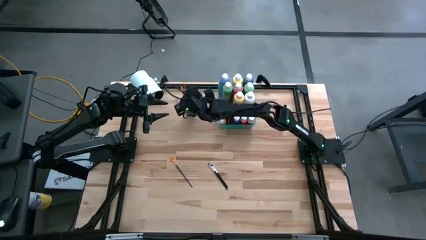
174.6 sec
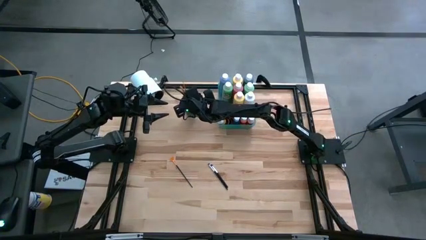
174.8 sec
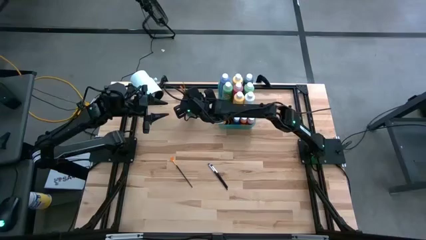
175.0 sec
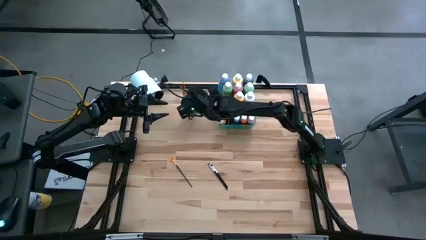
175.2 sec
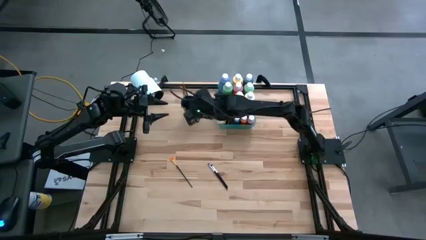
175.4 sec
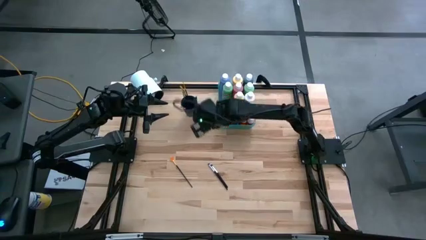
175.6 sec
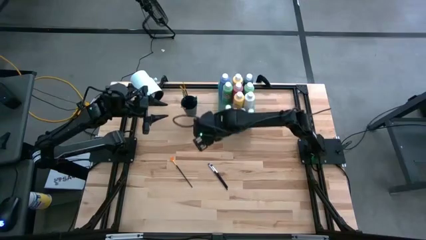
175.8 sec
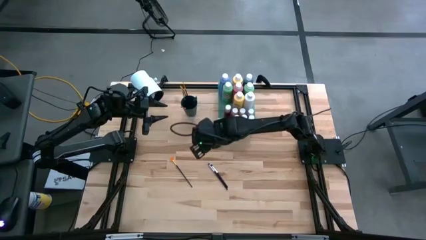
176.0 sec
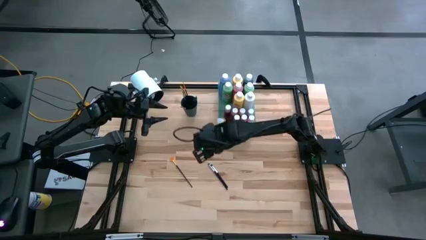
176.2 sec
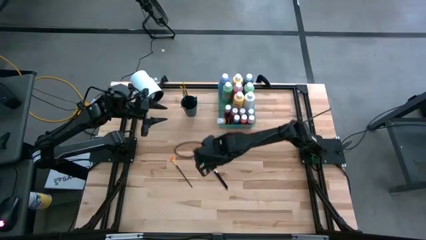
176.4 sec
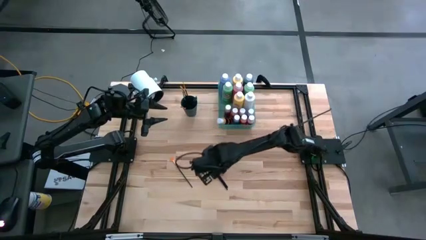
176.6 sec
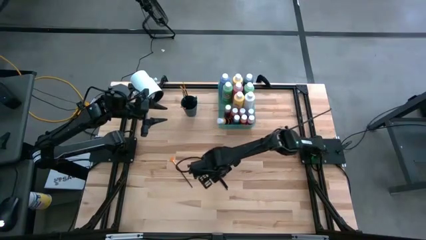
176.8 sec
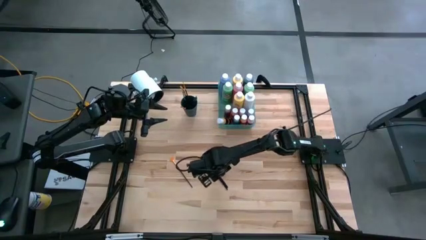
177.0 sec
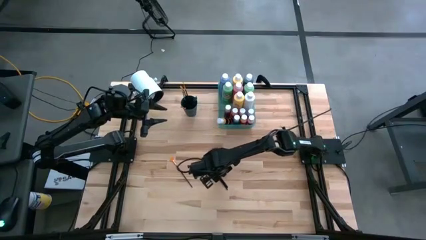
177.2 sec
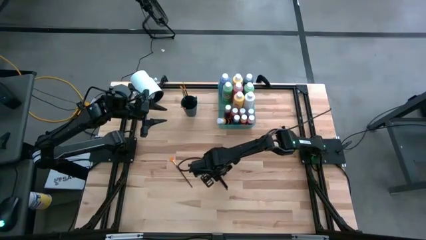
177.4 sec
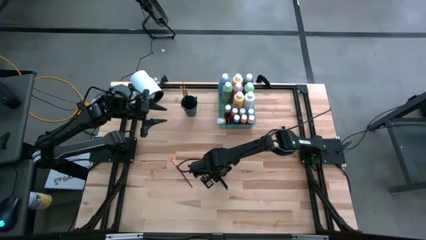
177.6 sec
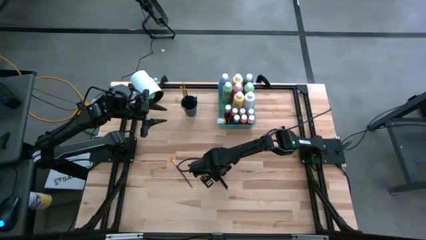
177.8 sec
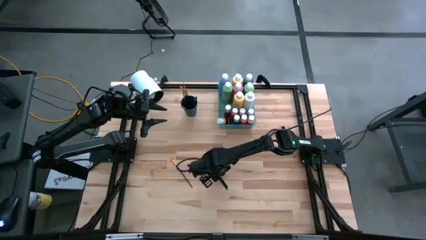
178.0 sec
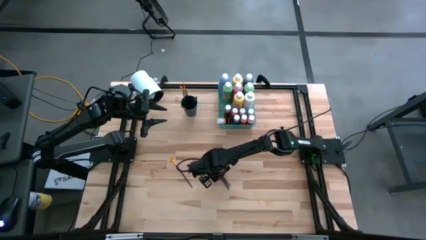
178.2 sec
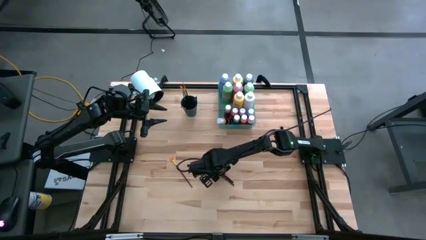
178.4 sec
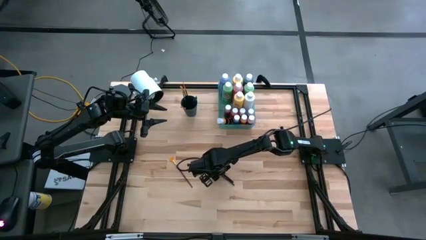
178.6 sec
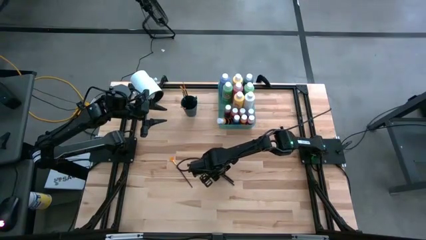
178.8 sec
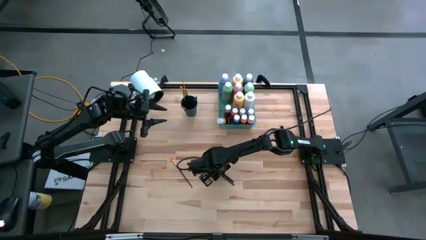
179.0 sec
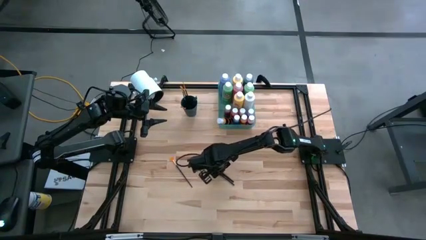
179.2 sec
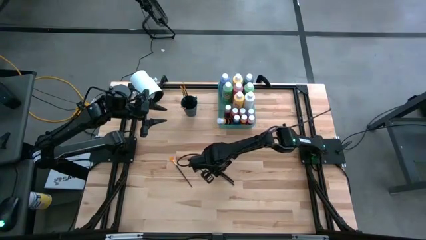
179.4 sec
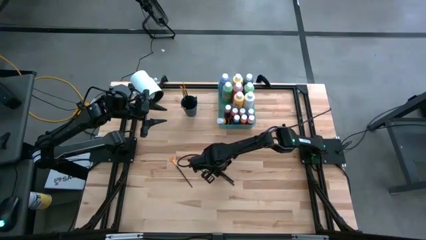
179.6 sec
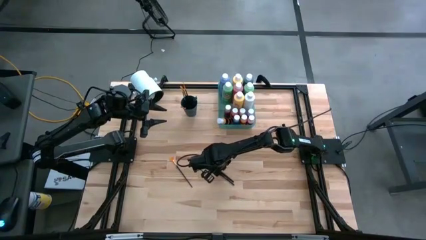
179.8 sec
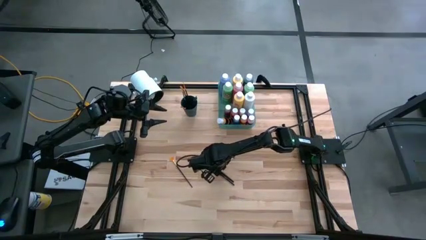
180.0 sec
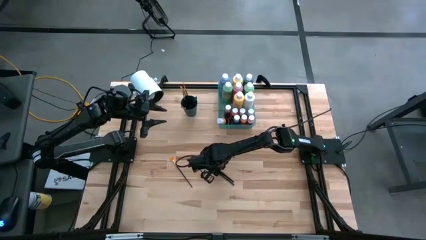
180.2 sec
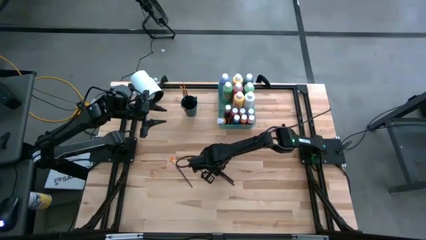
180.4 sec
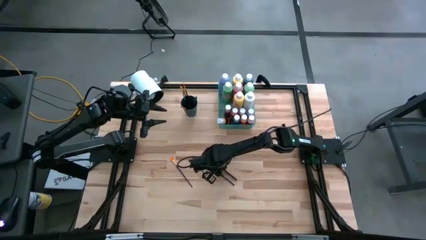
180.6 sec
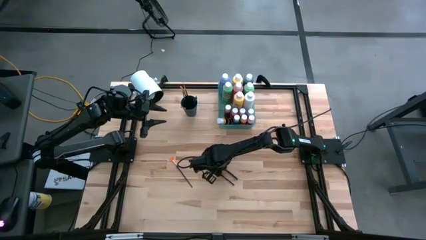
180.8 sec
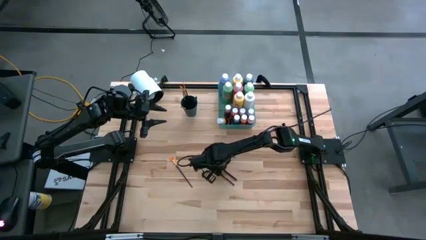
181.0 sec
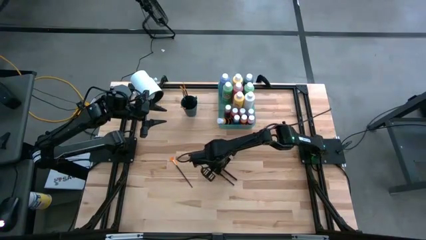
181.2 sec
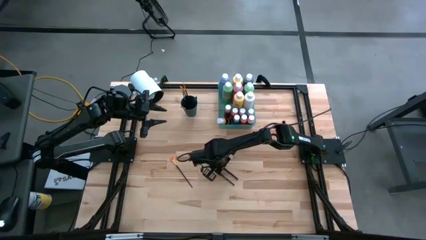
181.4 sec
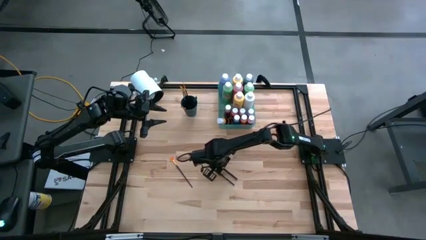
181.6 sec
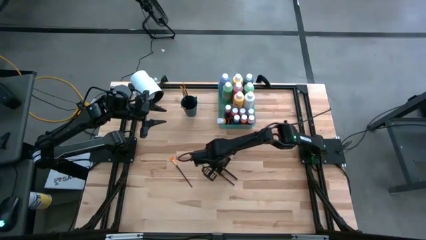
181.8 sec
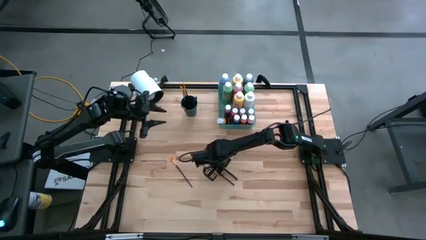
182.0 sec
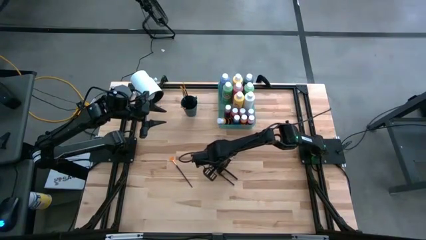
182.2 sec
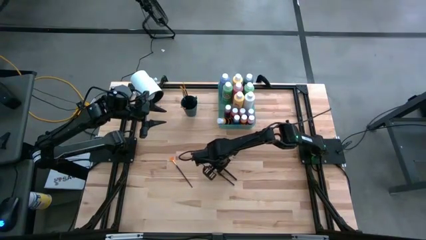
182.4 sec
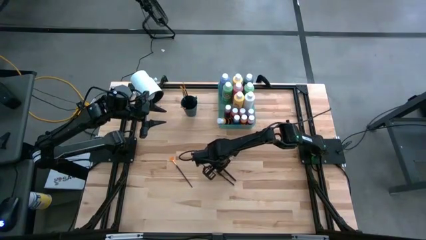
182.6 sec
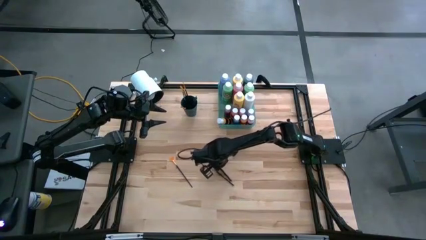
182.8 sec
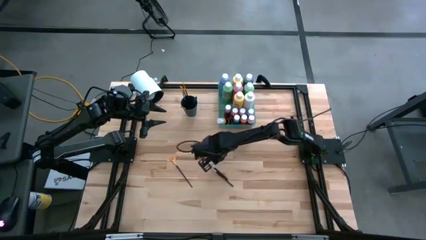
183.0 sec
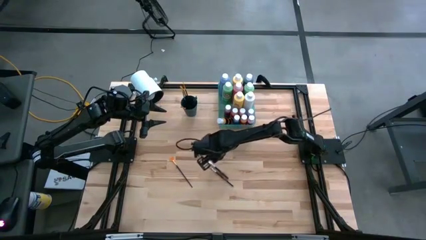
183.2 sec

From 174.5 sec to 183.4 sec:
Task: Pick & Place Paint Supplies
Put the black silver paint brush into the black cup

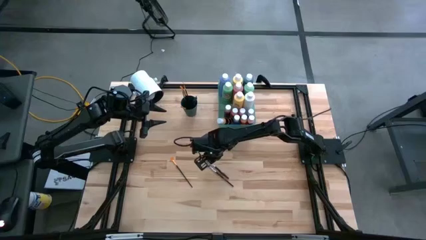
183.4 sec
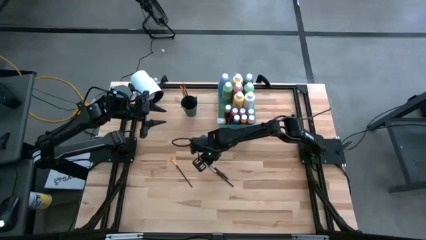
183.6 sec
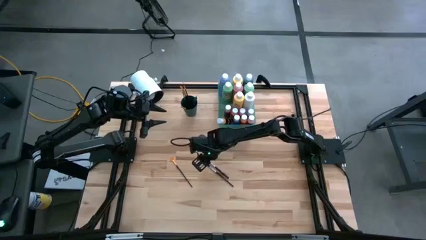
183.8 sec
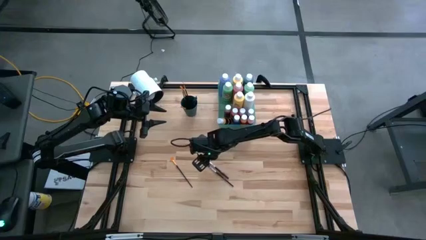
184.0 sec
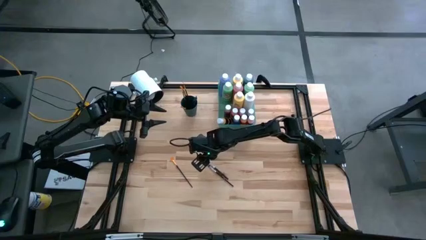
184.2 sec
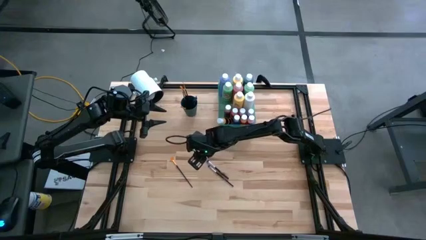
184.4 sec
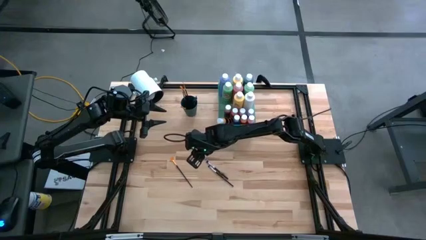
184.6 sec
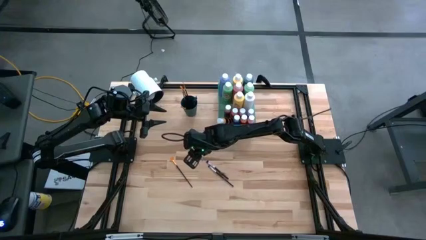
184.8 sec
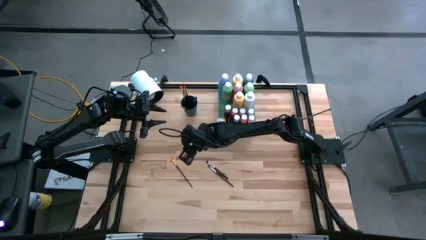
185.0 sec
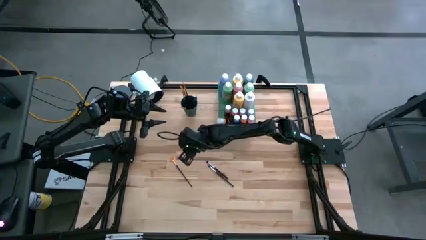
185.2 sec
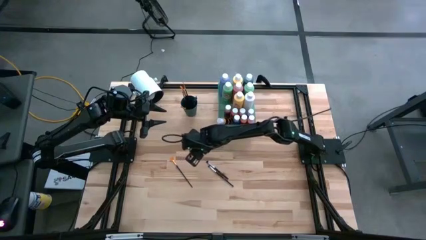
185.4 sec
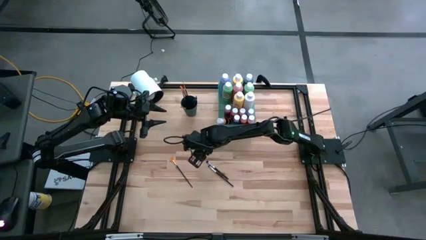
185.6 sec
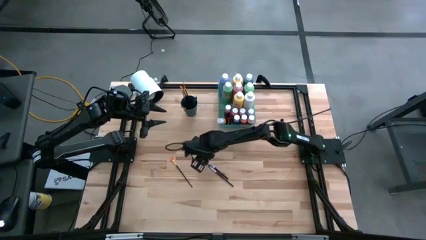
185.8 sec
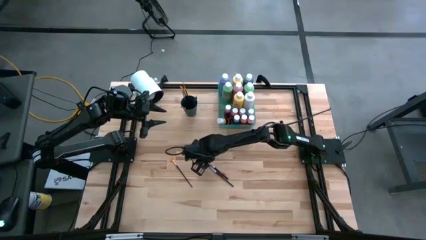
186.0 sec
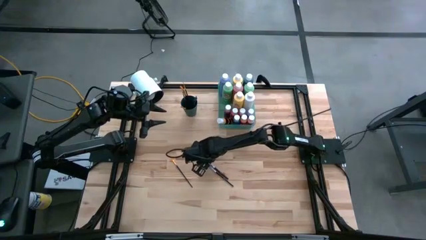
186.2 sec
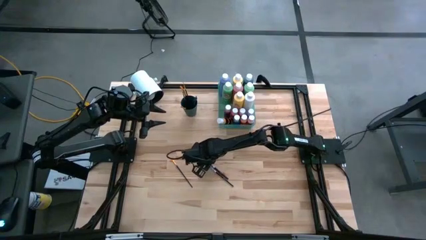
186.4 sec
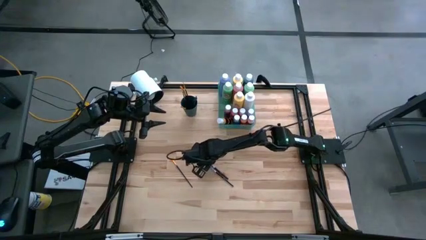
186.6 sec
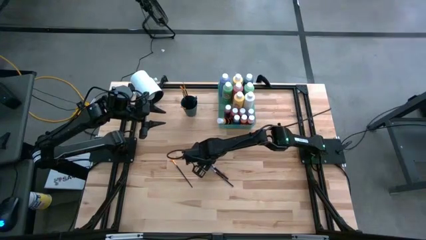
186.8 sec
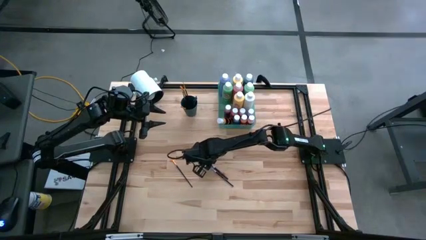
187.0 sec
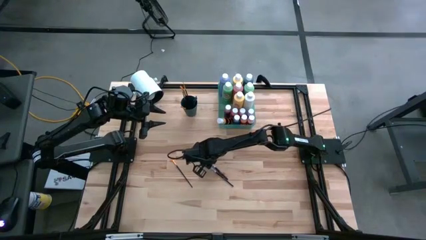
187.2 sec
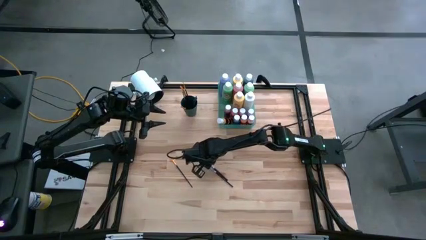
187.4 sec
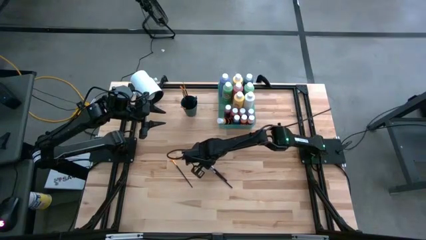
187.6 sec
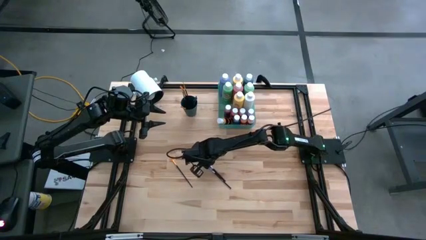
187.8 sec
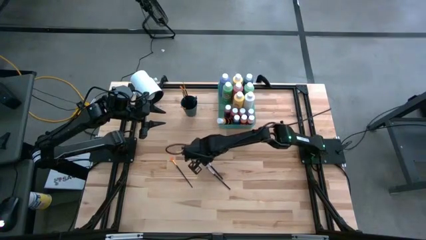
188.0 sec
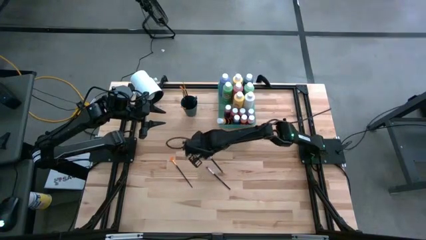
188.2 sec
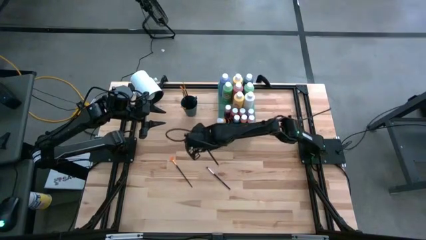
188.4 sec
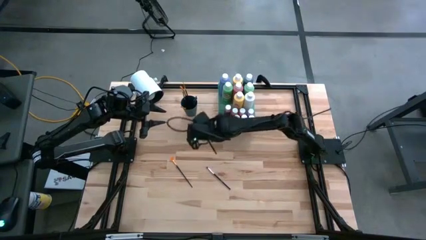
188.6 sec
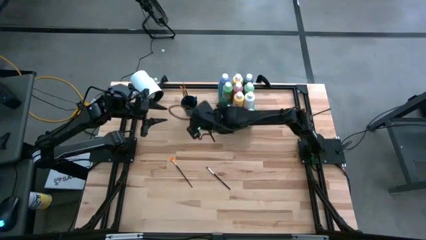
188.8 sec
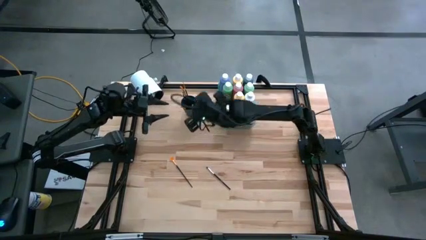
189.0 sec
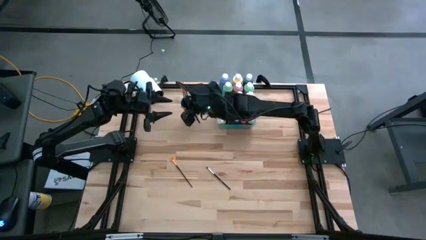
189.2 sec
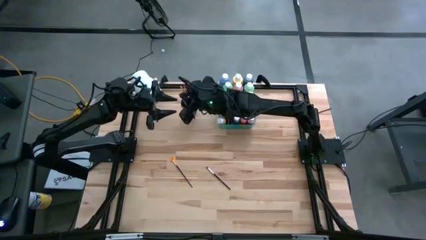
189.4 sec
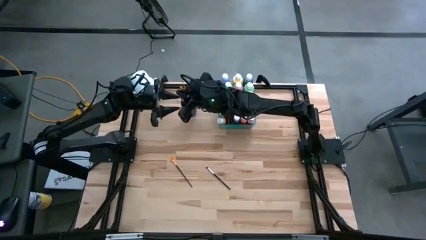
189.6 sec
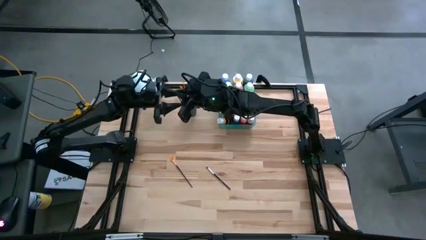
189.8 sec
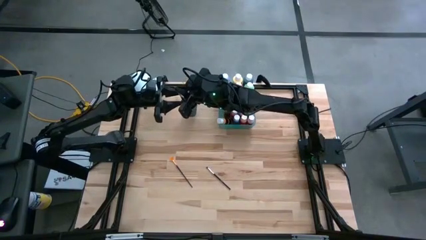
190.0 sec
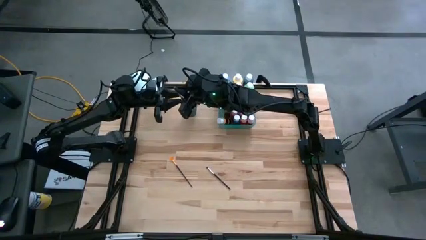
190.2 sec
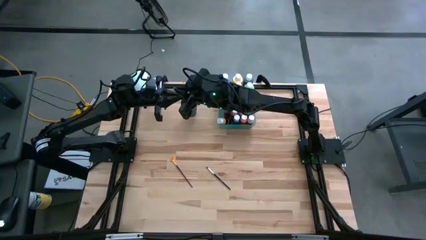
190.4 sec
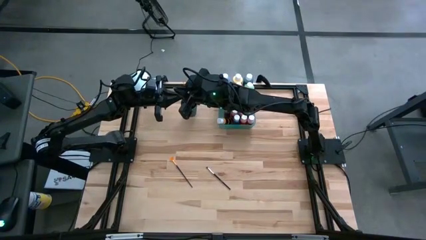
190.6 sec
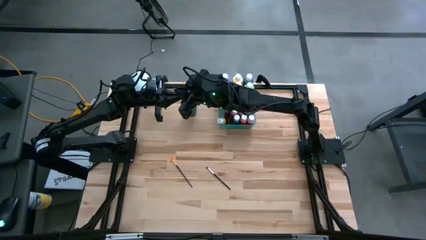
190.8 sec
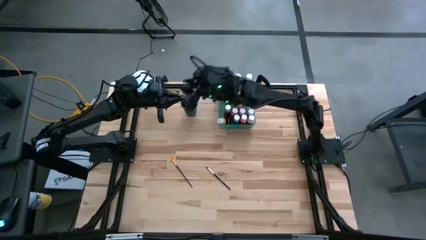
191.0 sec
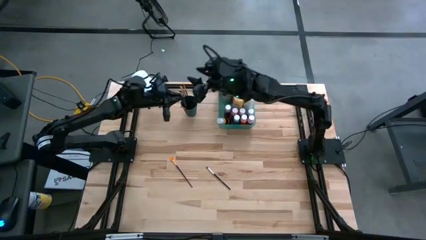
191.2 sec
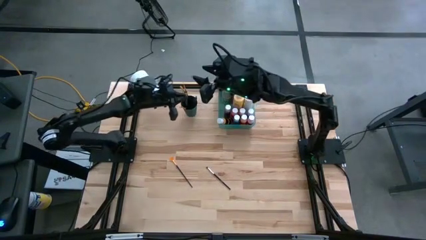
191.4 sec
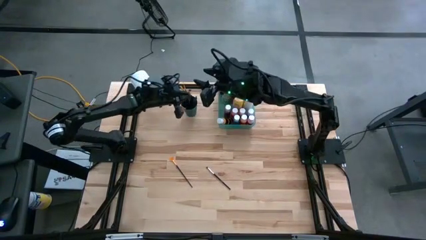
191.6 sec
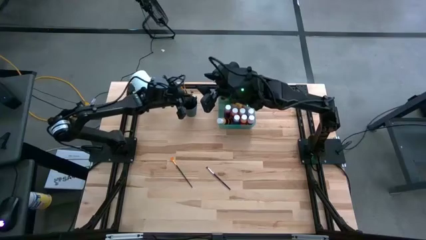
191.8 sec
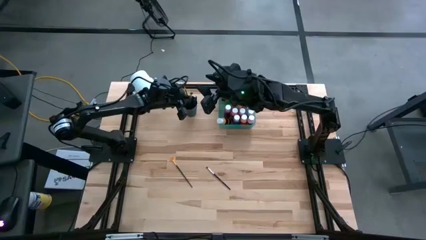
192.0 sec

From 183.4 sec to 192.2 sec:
Put the black silver paint brush into the black cup
